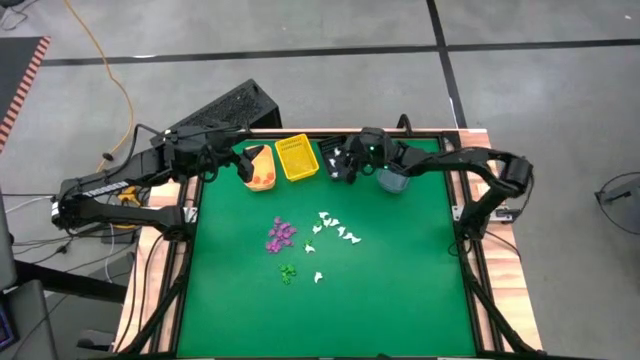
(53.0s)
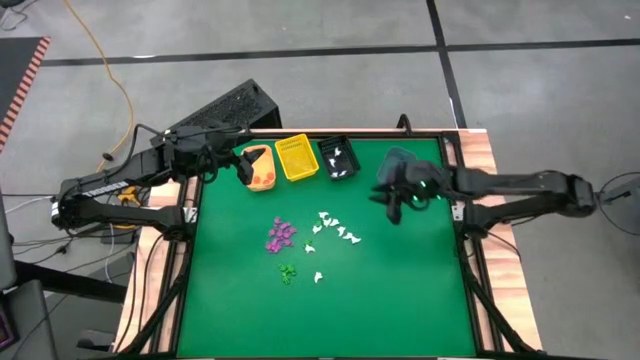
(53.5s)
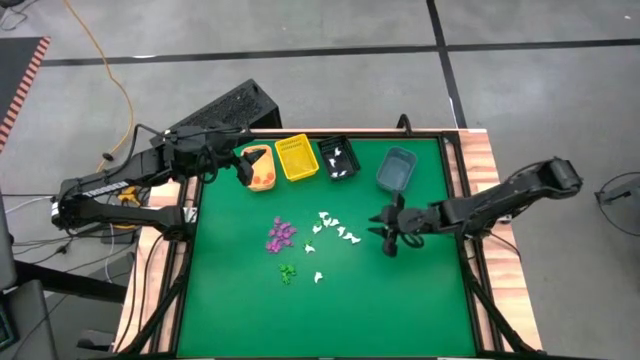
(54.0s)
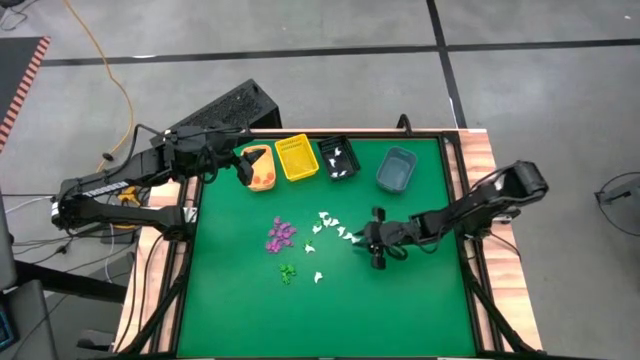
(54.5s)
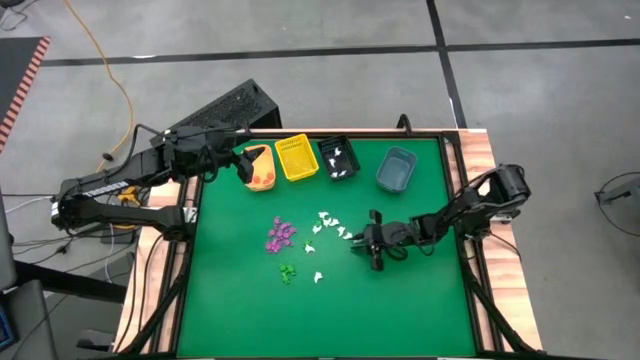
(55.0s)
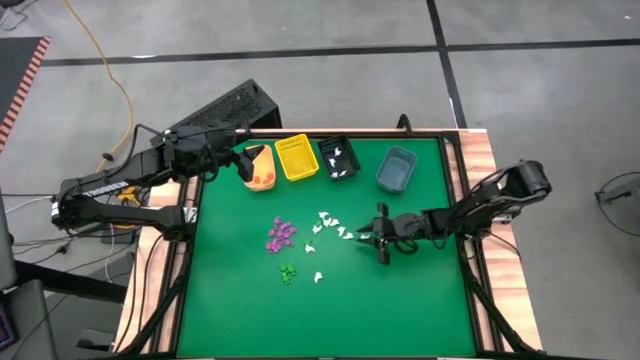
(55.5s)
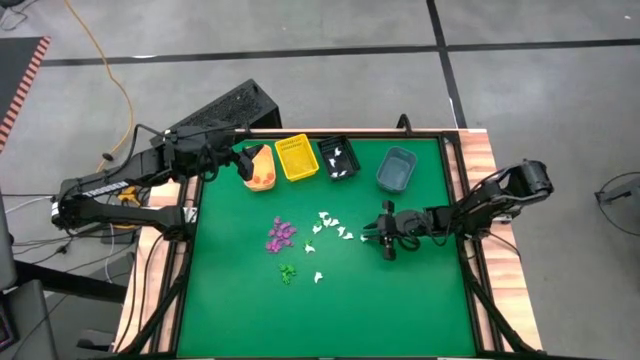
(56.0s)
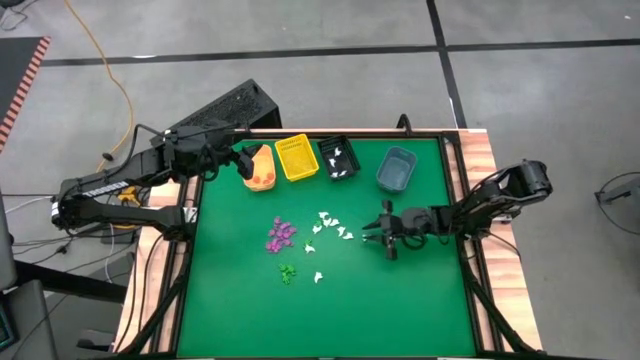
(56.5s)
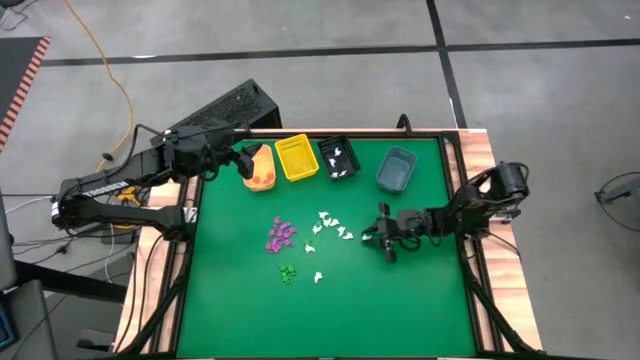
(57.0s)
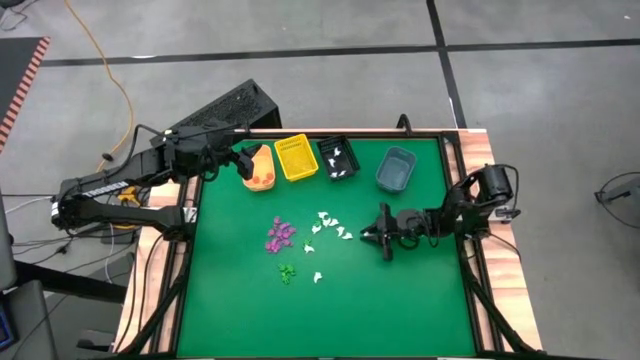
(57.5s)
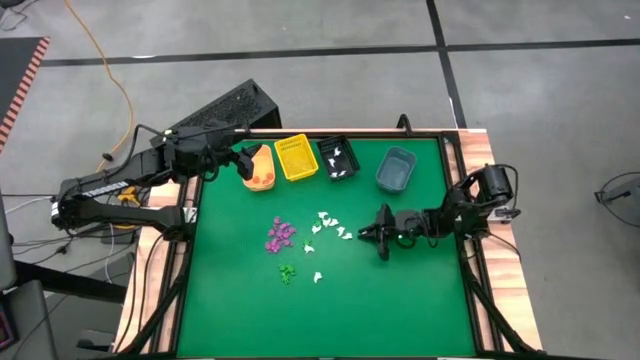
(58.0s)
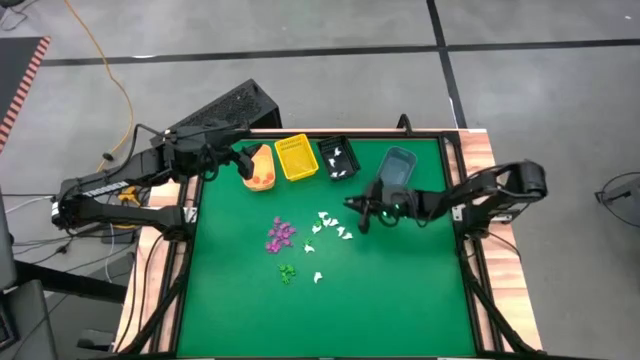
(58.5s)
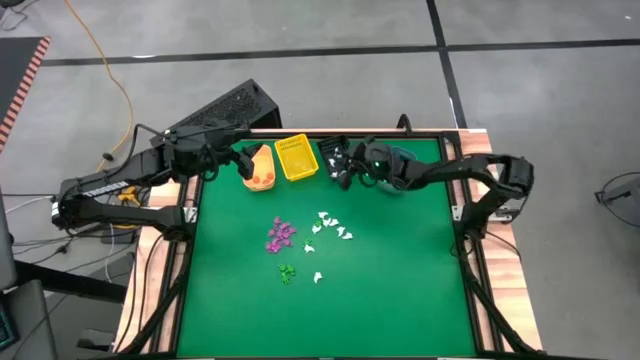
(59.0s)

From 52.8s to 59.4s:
Task: Sort Halloween decoration
Put the white ghost toy into the black bin

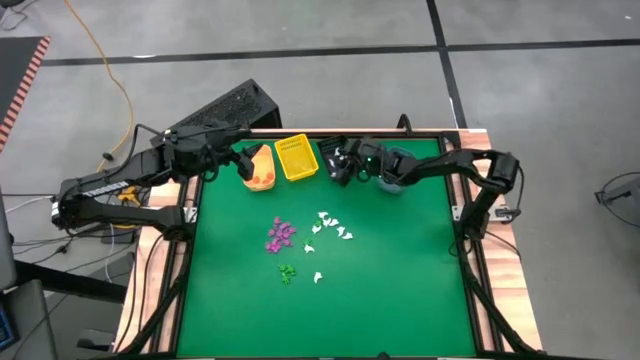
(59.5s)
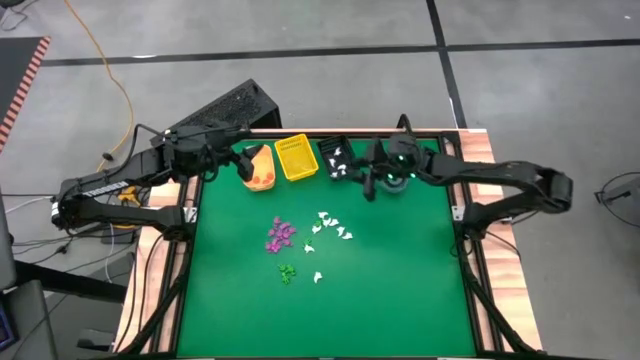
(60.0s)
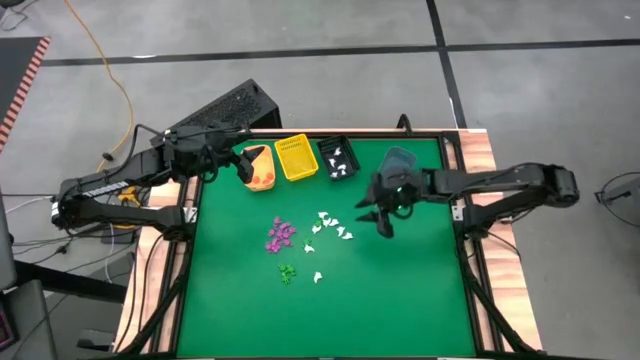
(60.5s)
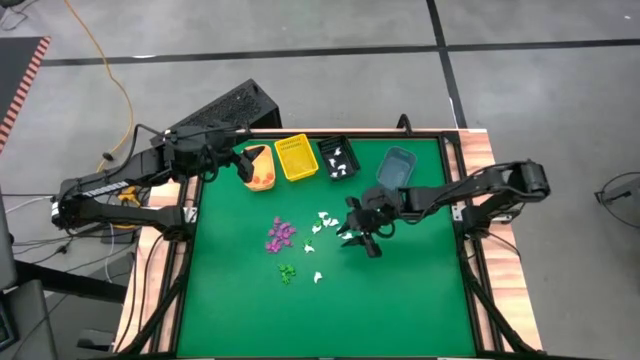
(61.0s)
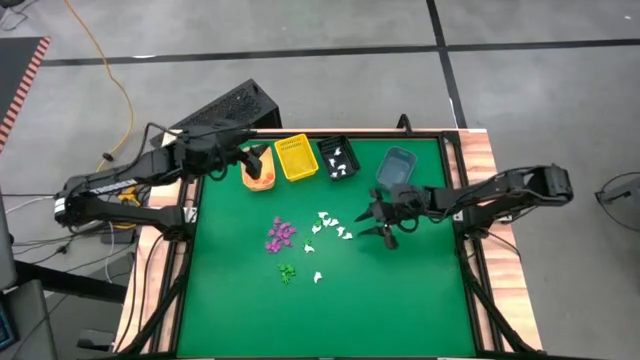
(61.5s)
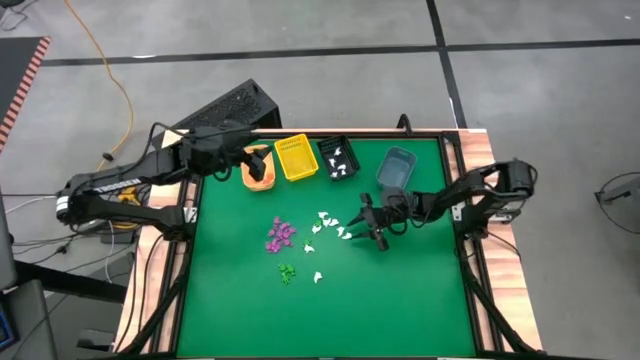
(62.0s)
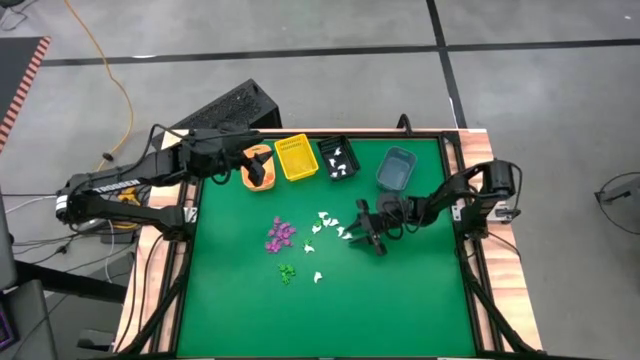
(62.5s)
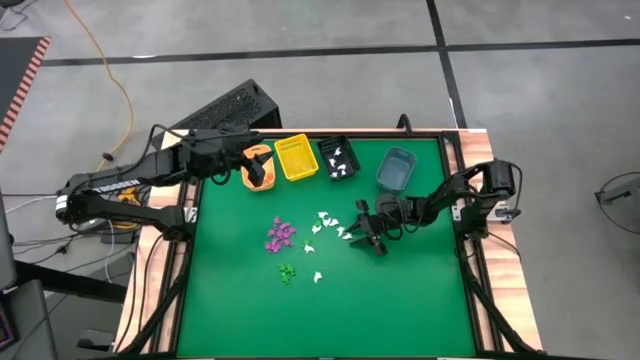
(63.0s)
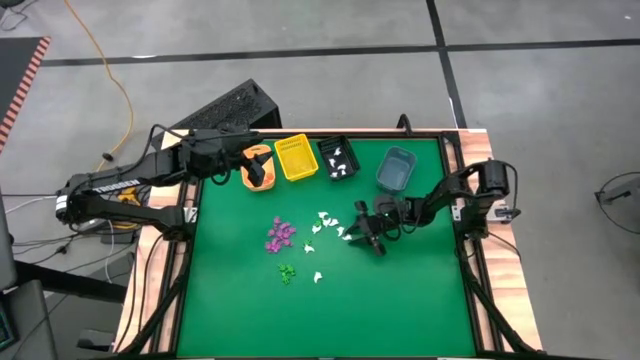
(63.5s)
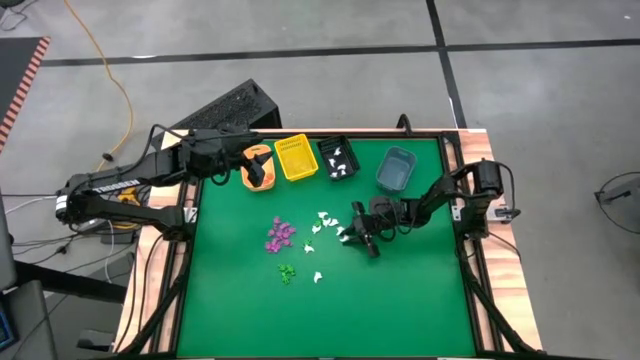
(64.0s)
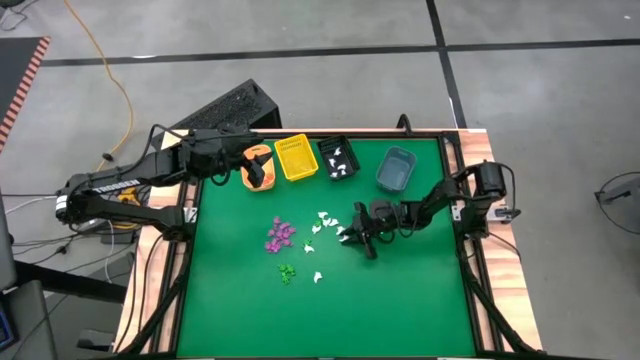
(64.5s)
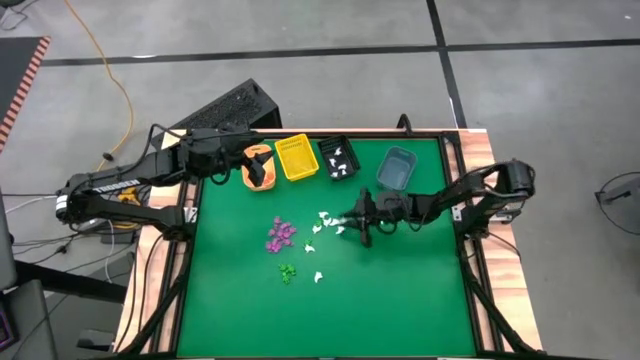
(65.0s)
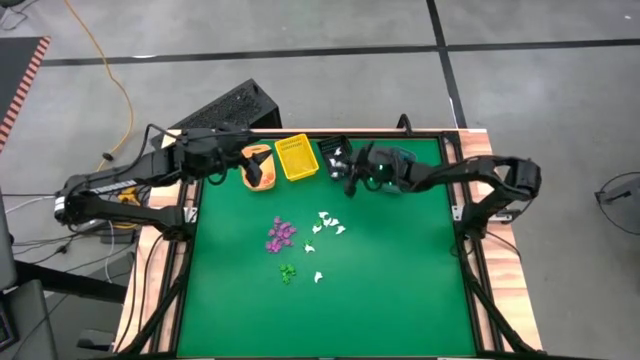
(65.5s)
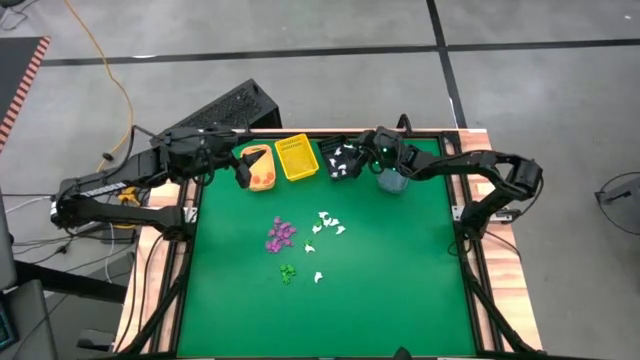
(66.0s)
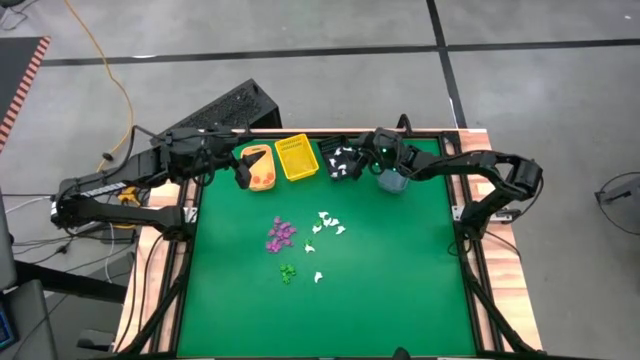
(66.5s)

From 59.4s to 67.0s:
Put the white ghost toy into the black bin

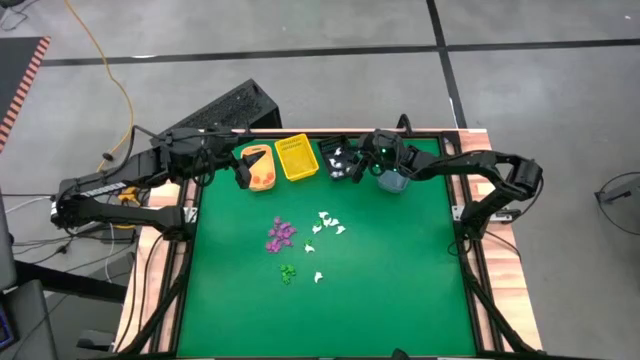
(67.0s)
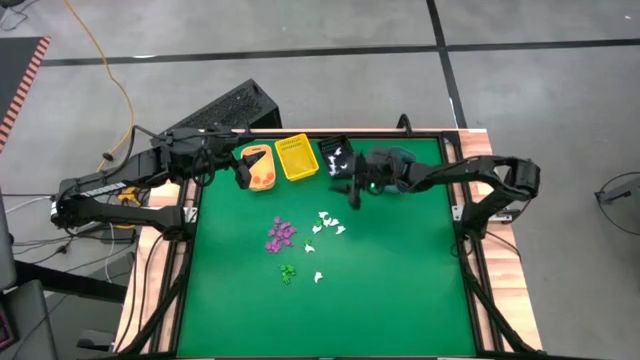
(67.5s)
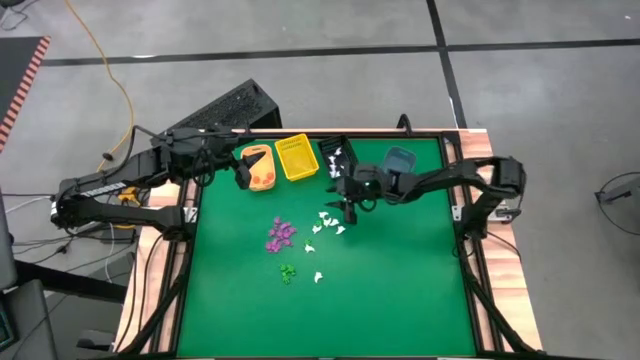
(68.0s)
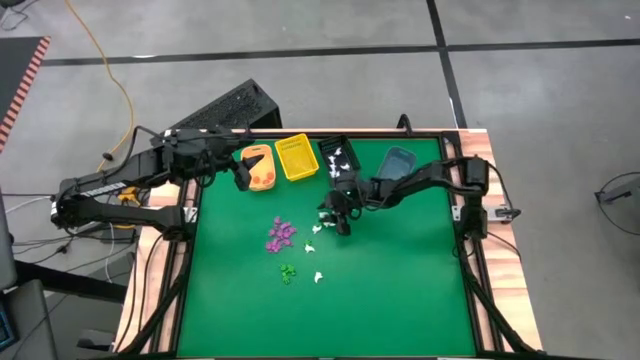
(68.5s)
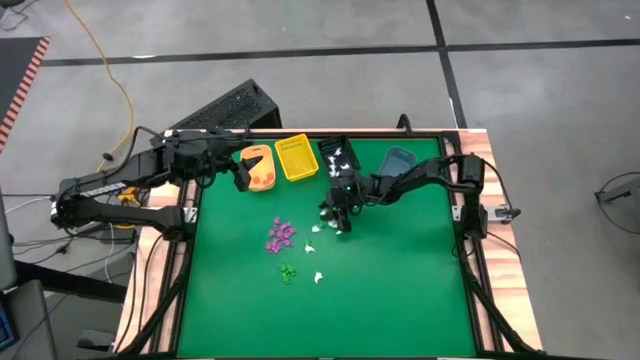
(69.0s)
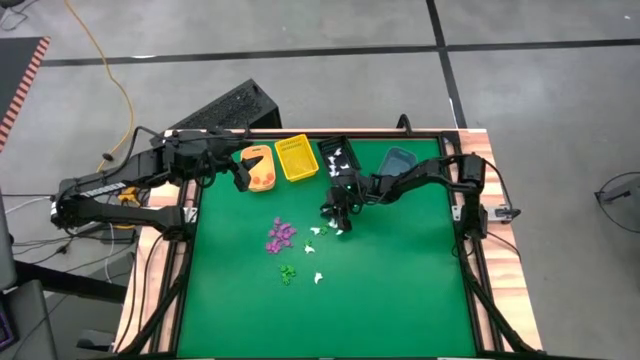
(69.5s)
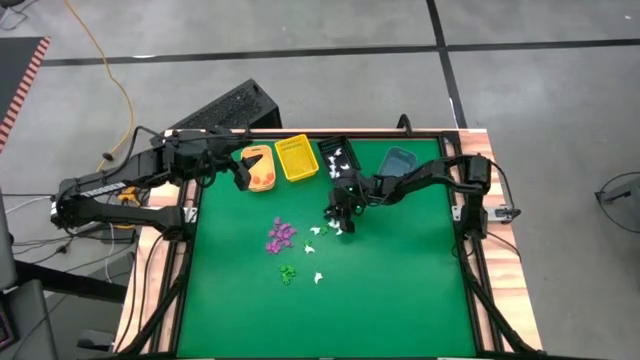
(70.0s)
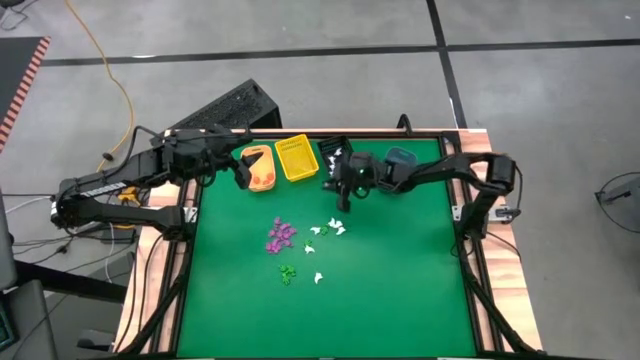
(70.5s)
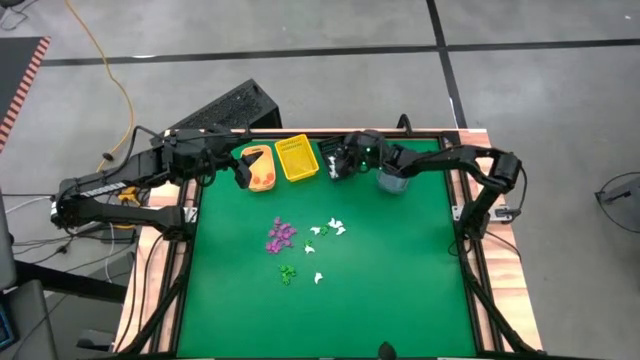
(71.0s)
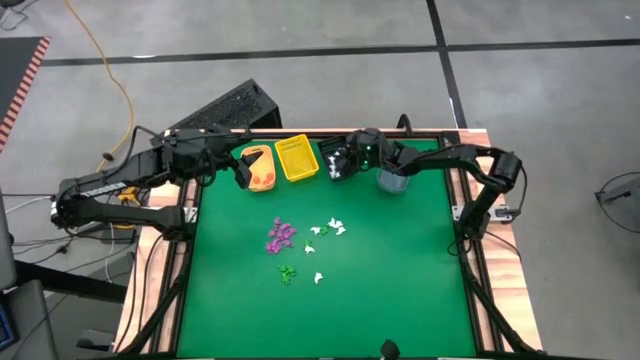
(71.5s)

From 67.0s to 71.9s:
Put the white ghost toy into the black bin

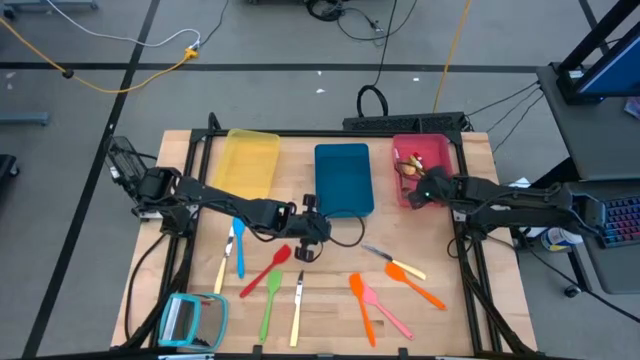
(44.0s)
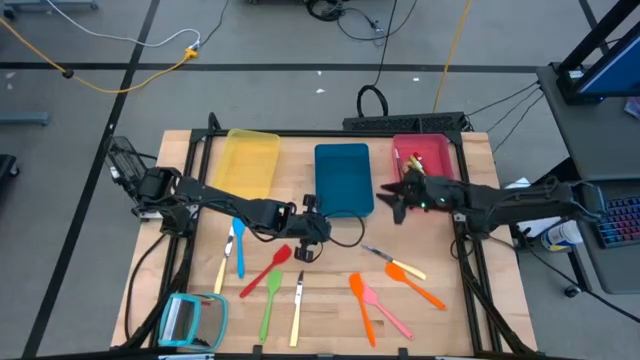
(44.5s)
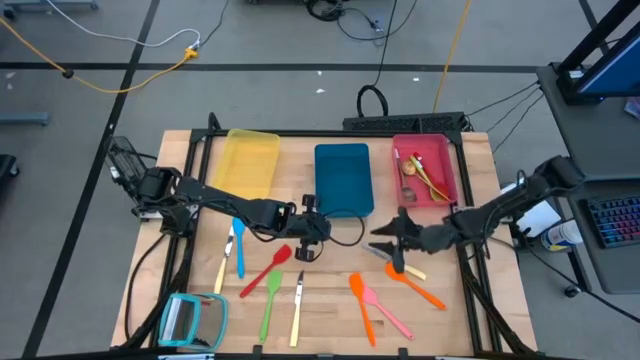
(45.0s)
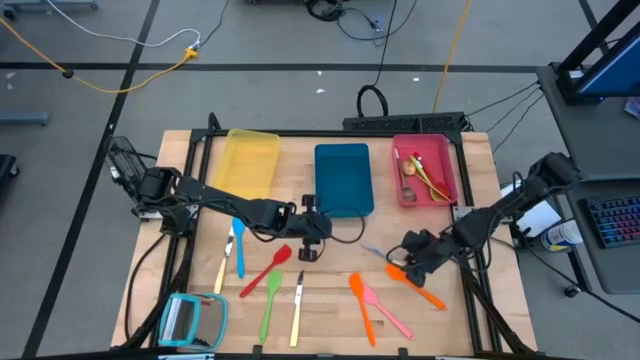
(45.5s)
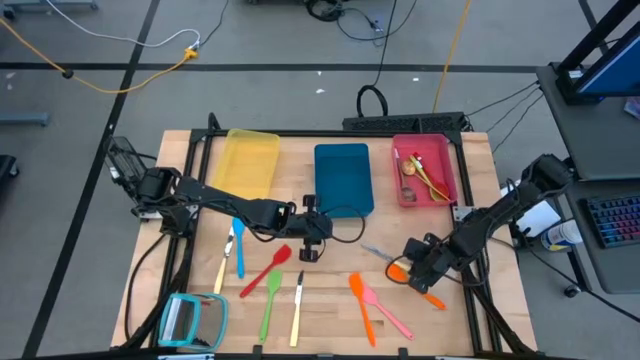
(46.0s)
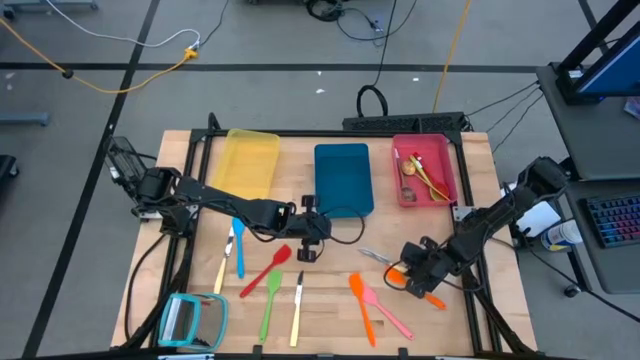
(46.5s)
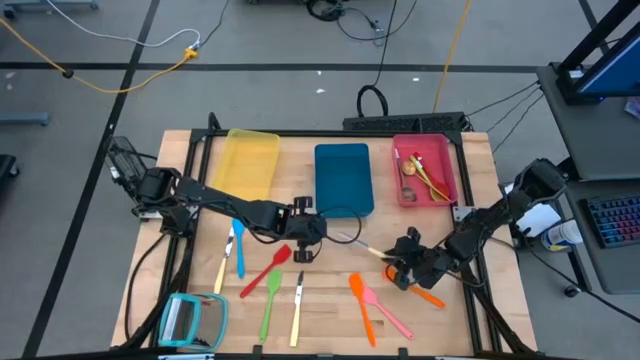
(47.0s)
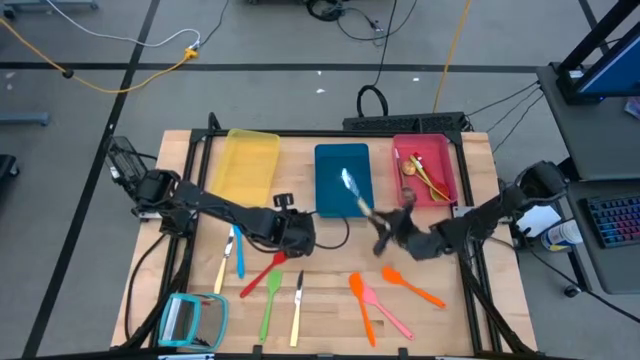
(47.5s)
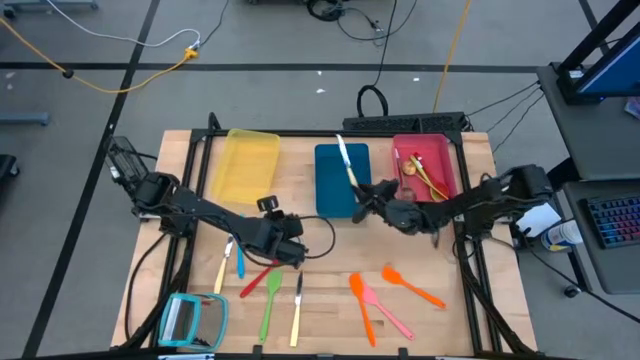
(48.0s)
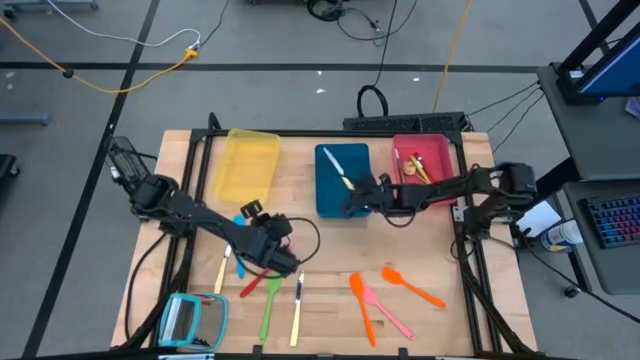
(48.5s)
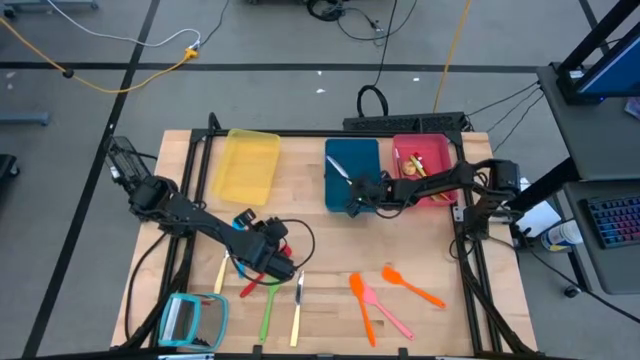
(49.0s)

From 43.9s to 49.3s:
Task: Pick & Place Kitchen Items
Put the top right yellow table knife into the blue bin
